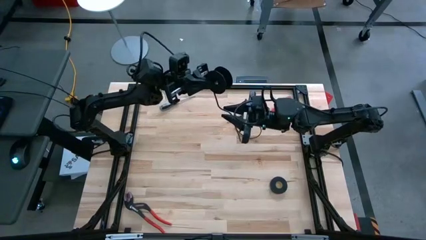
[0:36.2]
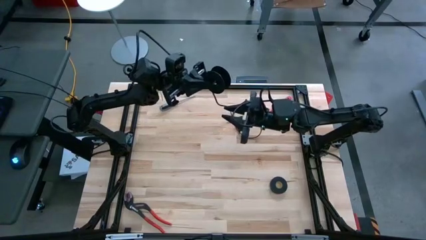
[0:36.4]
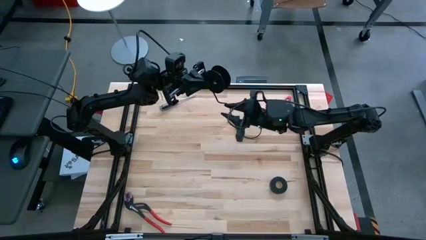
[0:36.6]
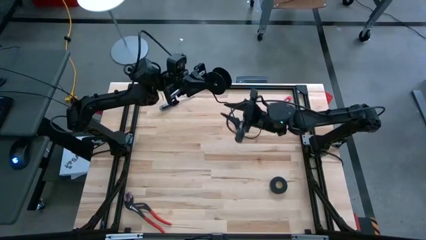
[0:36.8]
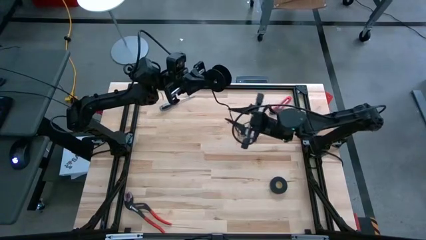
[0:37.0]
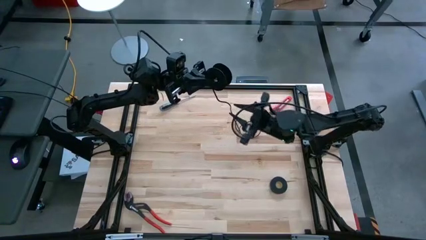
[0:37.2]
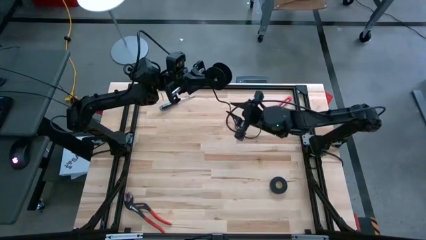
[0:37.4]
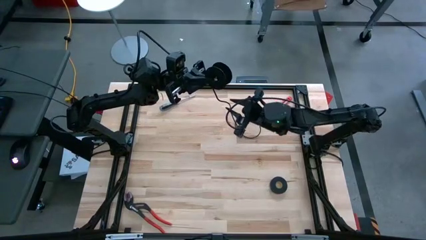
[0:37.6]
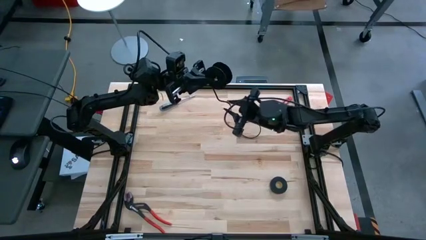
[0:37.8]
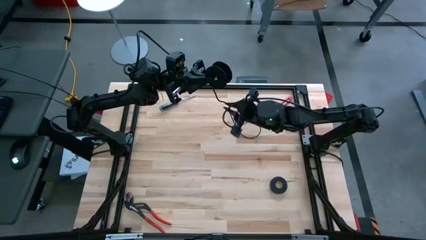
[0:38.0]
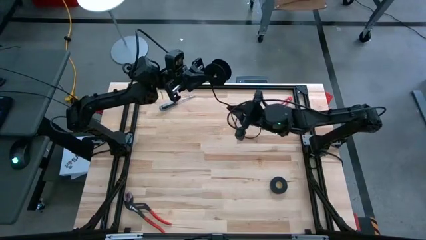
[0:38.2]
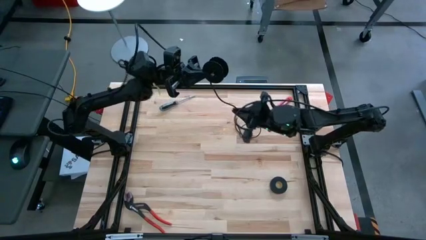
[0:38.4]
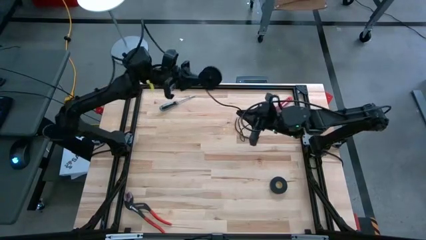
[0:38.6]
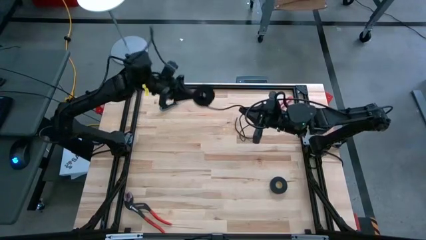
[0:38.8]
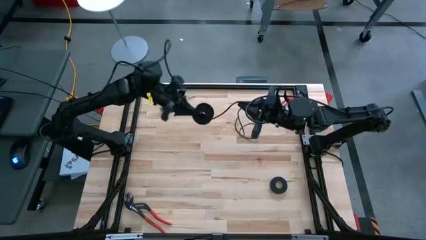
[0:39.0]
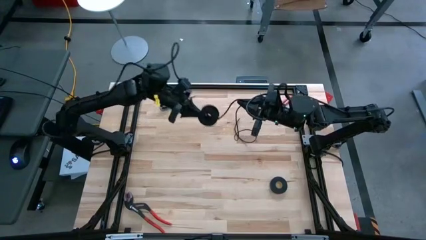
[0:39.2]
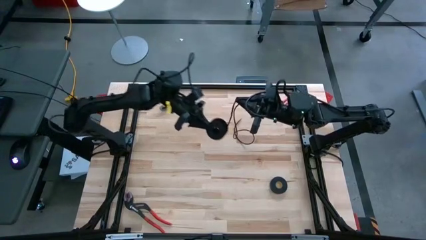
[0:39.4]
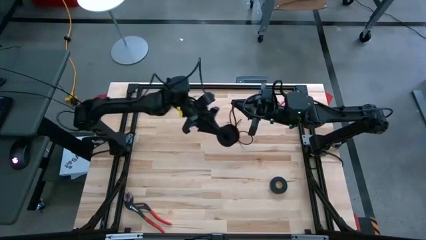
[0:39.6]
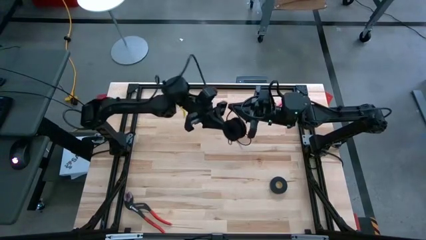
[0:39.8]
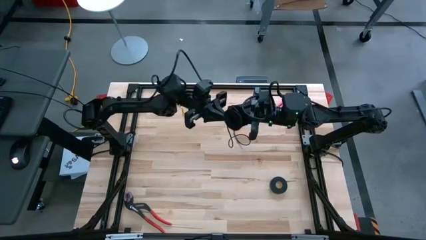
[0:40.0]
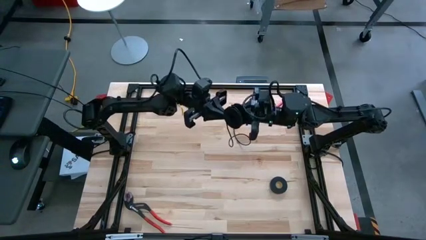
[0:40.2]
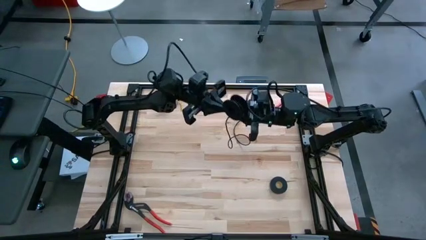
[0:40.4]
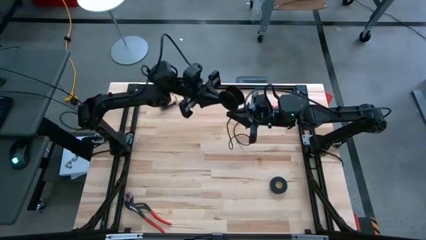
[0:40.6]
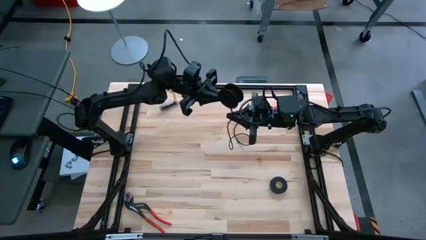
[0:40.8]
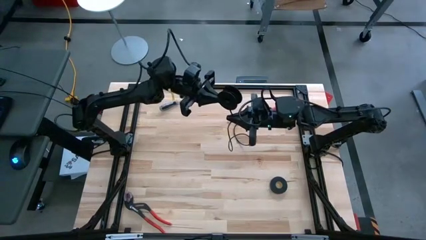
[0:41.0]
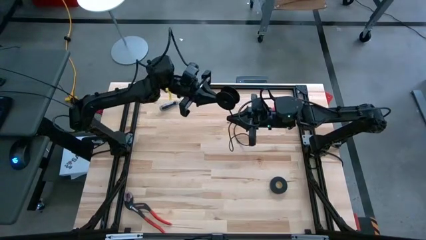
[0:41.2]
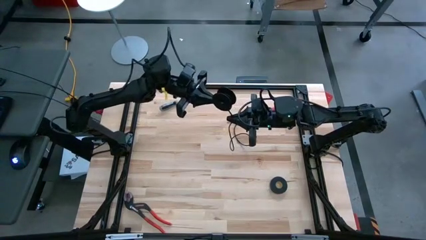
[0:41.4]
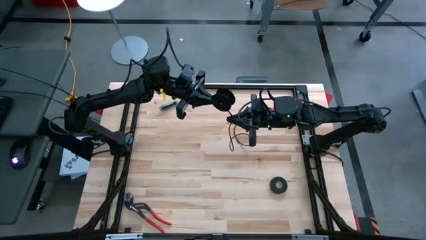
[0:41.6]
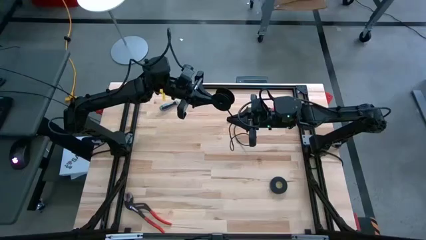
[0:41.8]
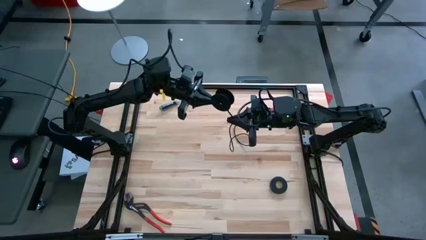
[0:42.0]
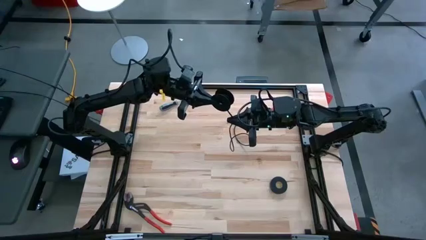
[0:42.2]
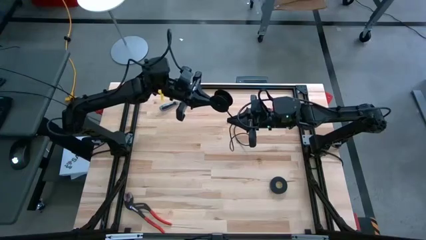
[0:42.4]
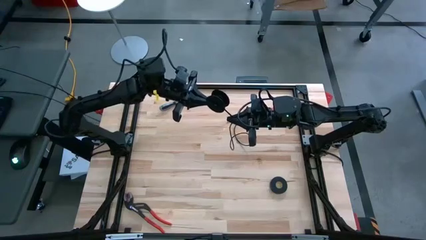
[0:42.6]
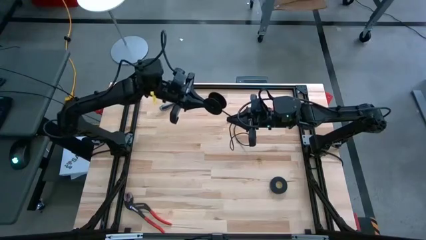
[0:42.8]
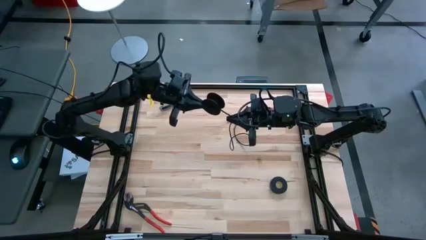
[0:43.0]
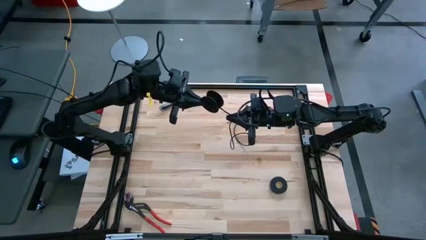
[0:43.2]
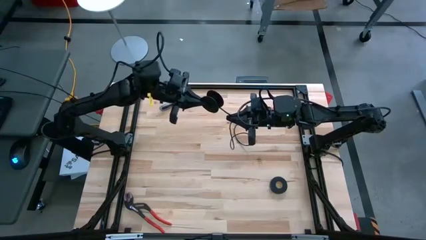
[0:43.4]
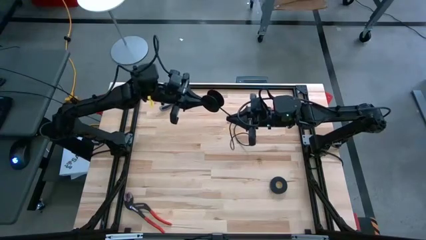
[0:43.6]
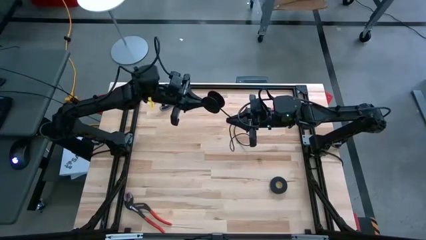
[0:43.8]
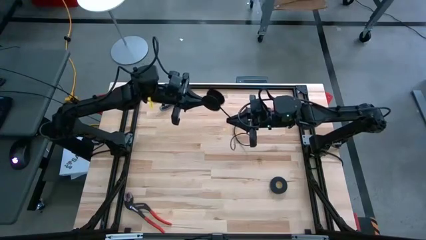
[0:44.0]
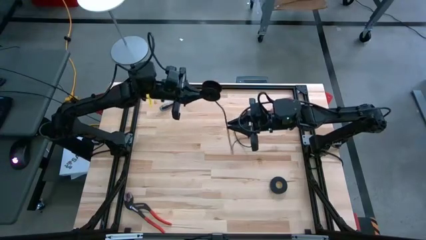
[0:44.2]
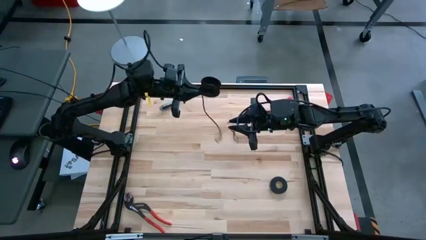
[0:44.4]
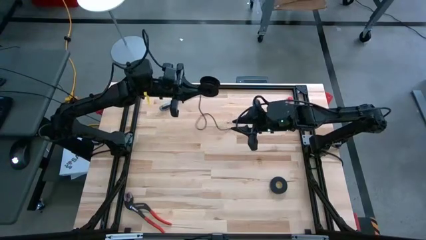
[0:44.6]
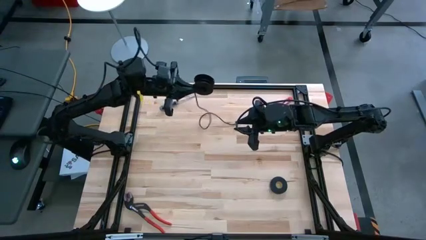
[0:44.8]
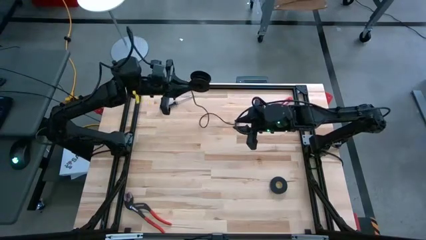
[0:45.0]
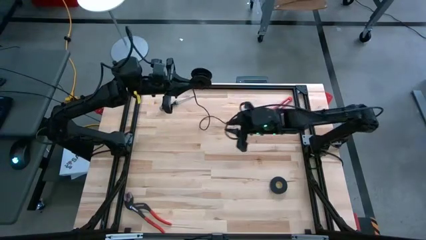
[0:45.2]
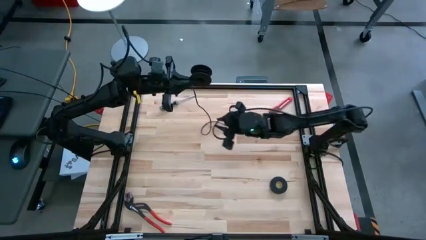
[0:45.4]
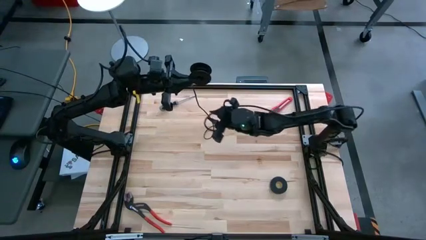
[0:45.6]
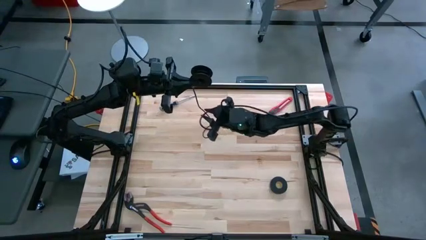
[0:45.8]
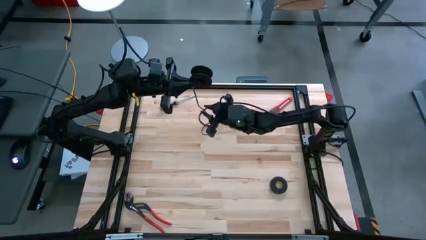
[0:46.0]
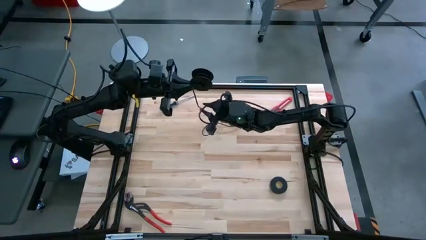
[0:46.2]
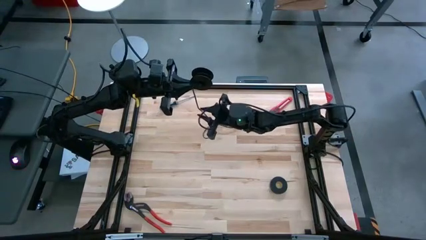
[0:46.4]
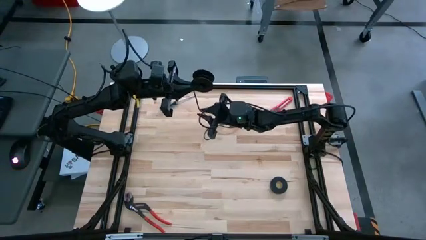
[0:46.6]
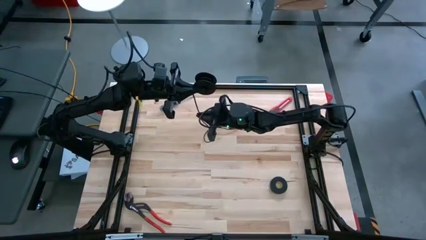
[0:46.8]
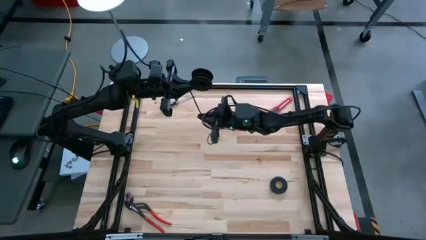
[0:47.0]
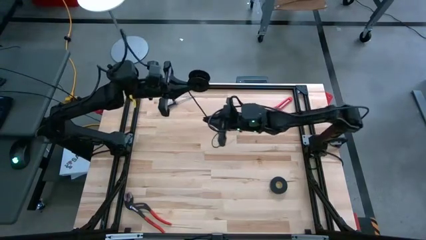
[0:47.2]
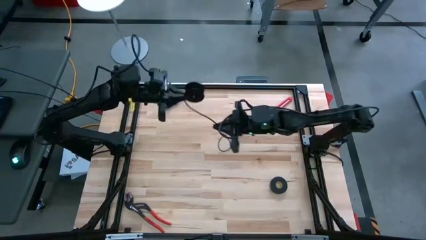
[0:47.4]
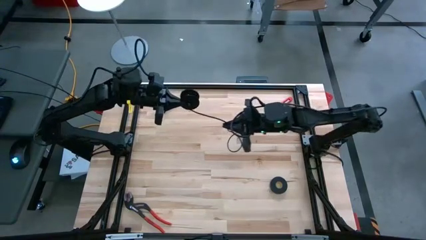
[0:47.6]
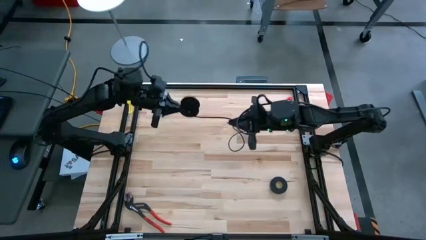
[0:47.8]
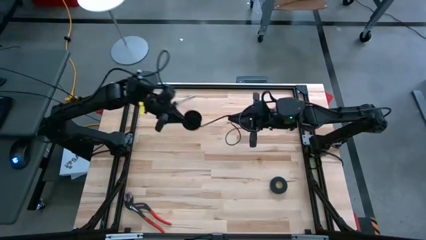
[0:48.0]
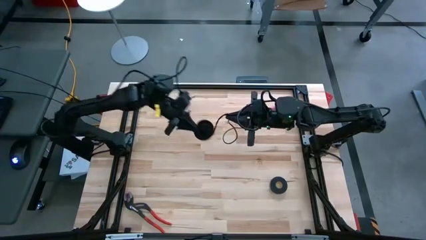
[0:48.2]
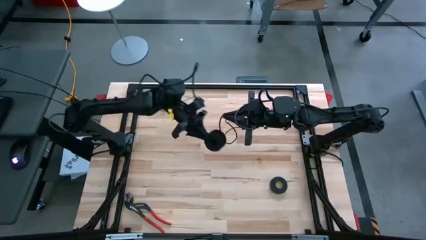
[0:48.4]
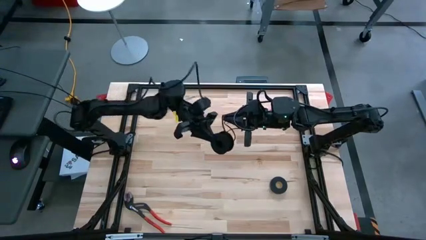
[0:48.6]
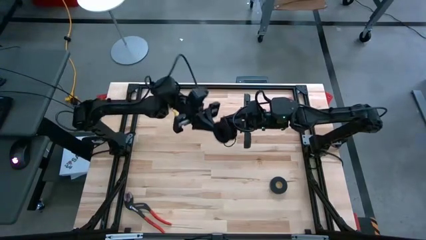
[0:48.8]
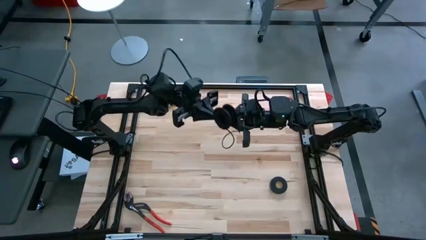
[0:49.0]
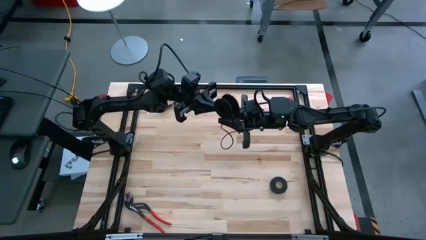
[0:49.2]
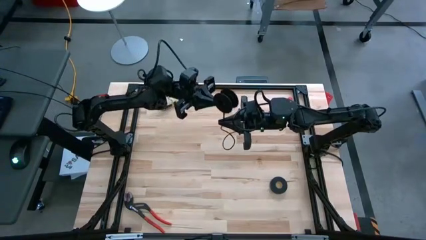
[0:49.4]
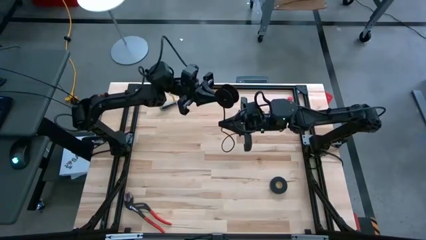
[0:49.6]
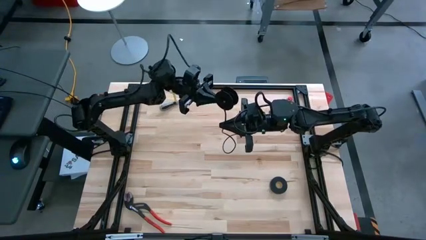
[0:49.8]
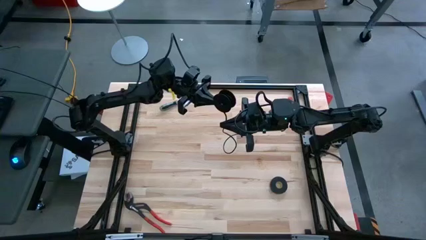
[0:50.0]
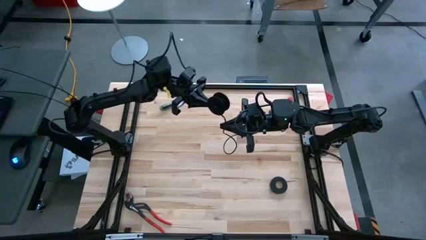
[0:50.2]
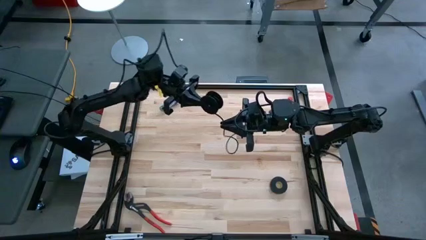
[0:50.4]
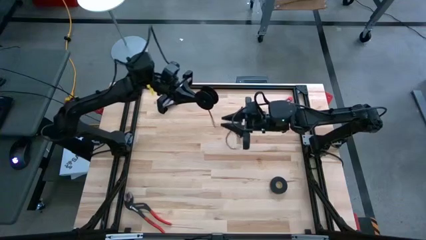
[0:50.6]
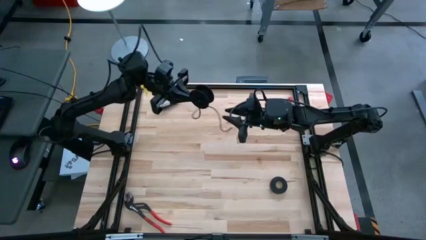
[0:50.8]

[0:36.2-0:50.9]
Task: Coil cords
Coil the black wire on the black spool

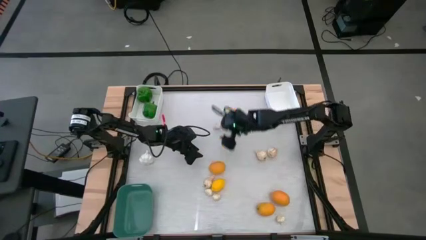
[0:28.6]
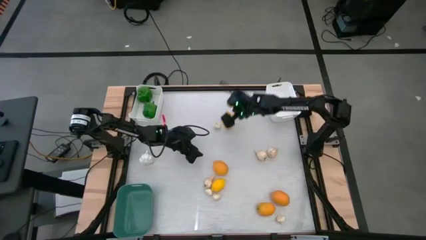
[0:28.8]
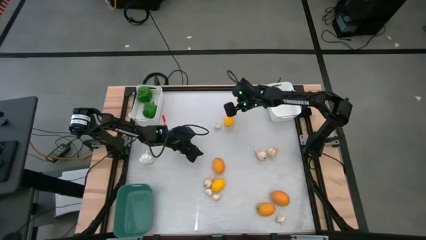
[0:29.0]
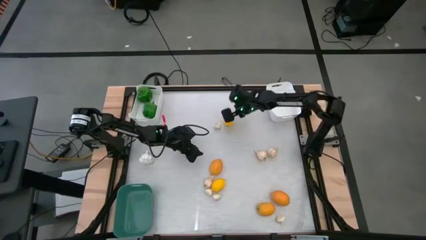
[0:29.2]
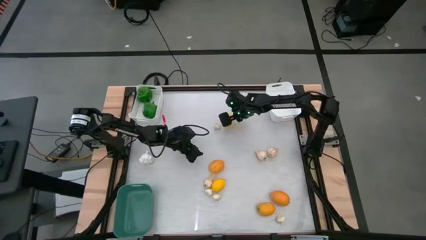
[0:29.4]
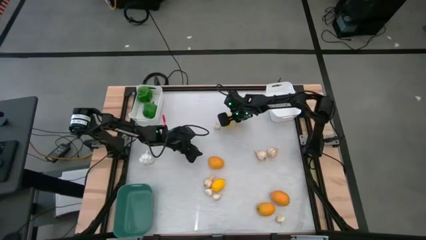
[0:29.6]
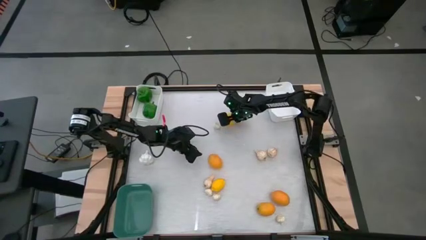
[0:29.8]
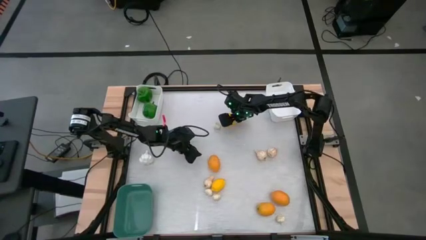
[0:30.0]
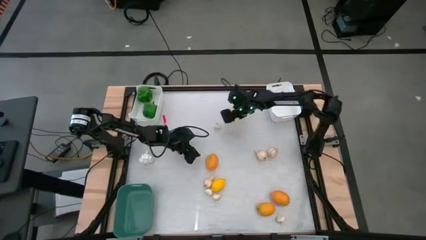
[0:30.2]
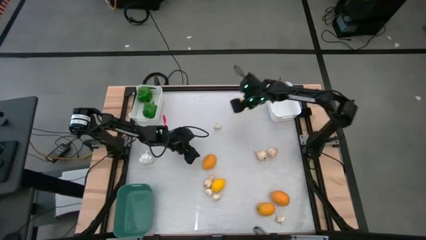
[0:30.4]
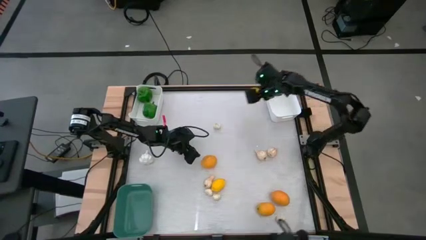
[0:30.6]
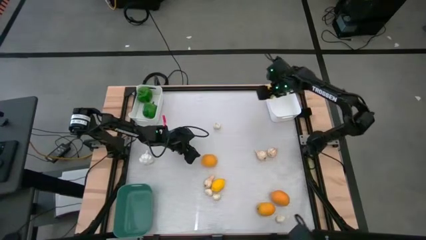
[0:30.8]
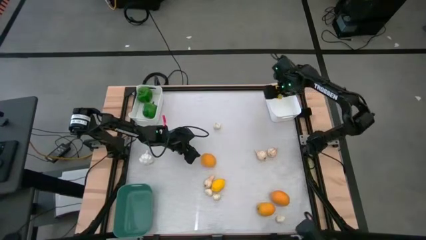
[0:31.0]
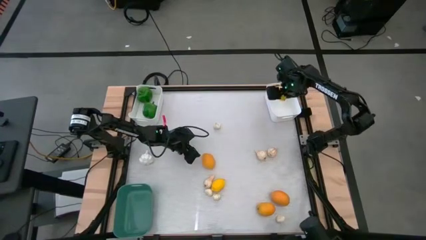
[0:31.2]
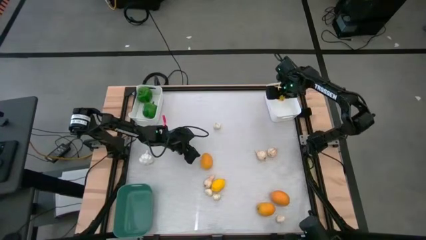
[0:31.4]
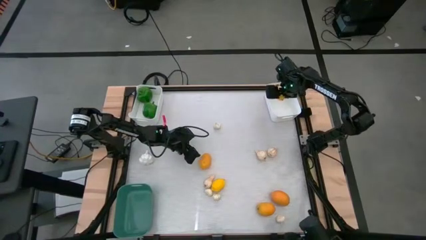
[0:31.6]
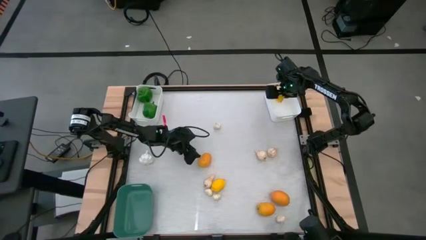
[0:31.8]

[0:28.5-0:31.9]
Task: Sort produce into baskets
Put the yellow lemon into the right white bin
